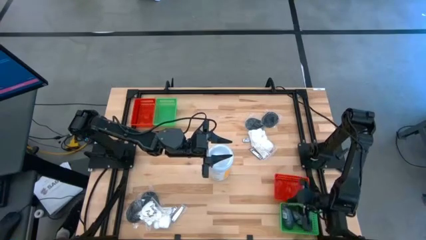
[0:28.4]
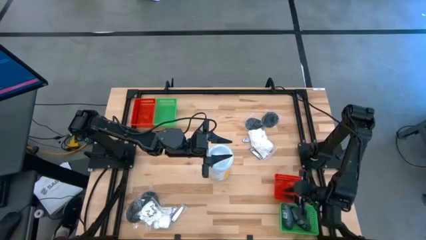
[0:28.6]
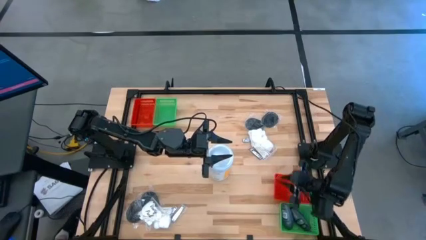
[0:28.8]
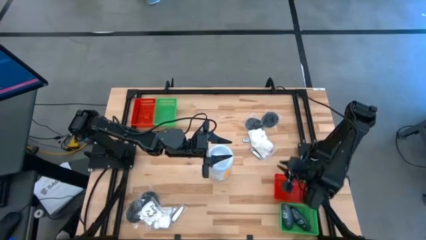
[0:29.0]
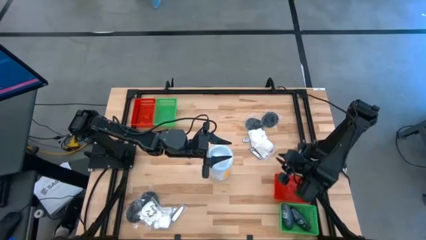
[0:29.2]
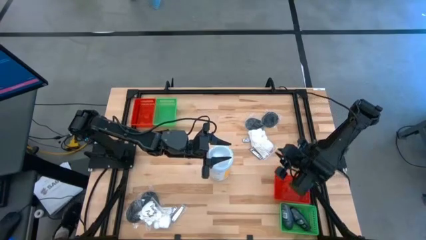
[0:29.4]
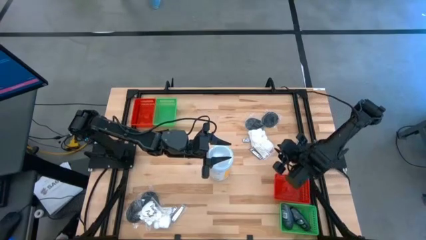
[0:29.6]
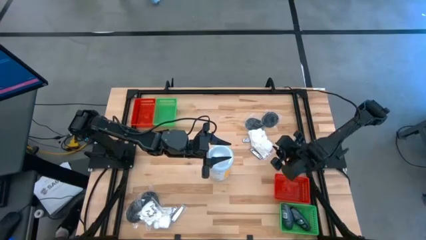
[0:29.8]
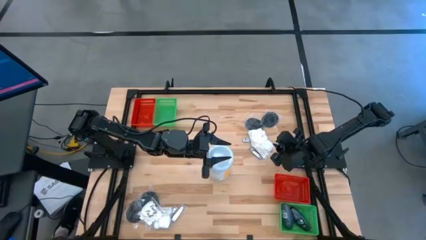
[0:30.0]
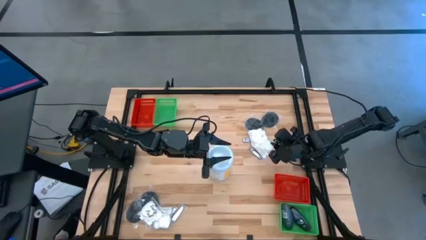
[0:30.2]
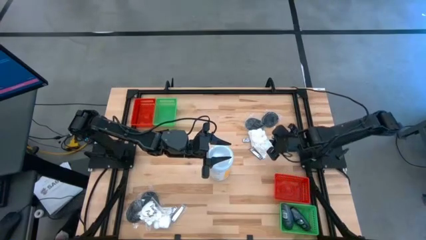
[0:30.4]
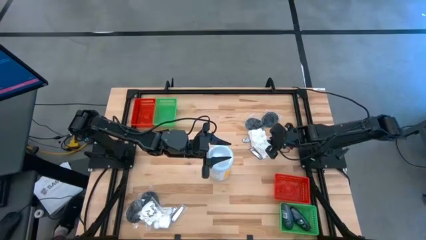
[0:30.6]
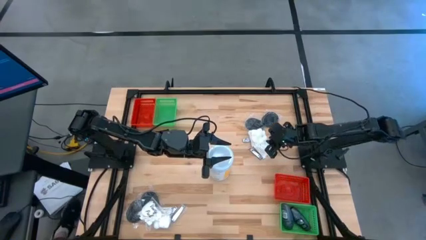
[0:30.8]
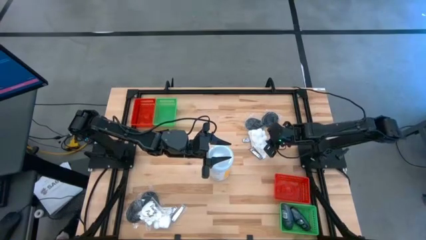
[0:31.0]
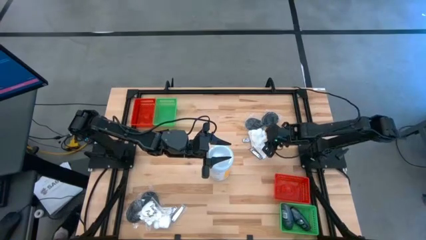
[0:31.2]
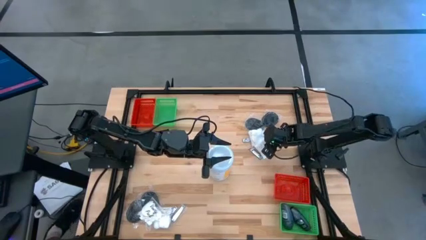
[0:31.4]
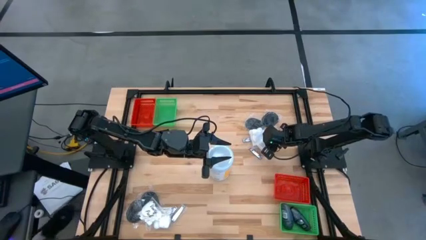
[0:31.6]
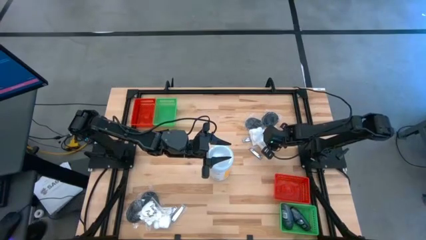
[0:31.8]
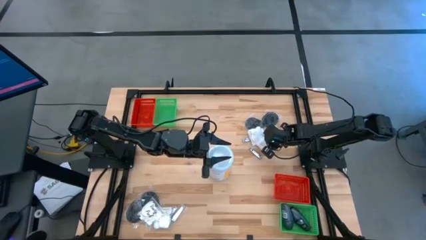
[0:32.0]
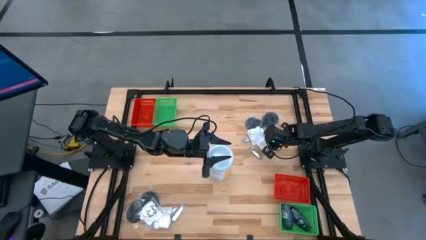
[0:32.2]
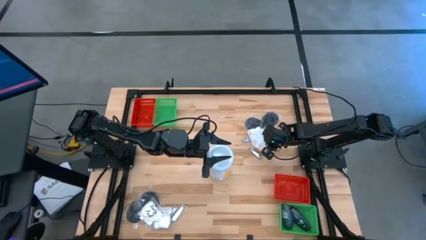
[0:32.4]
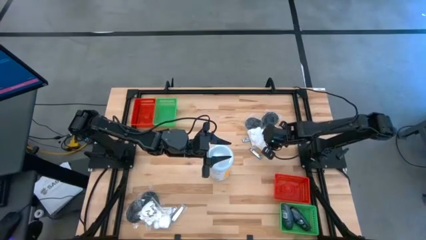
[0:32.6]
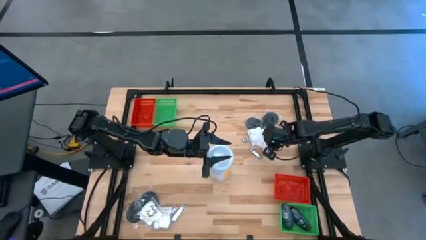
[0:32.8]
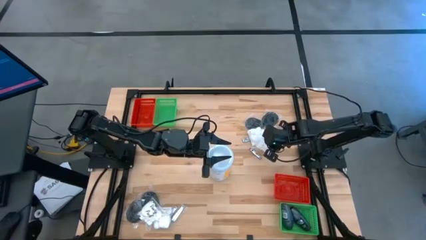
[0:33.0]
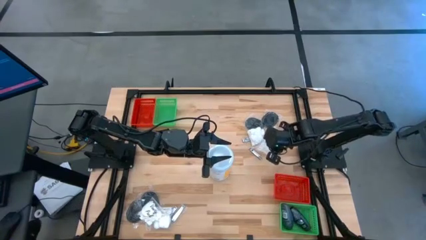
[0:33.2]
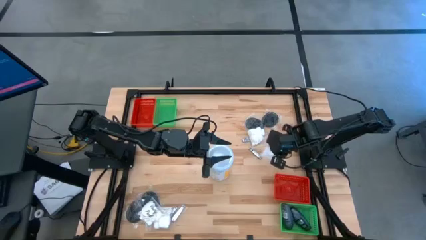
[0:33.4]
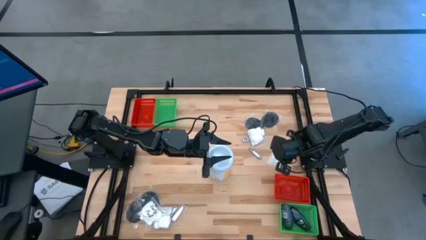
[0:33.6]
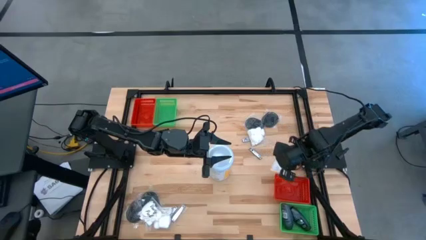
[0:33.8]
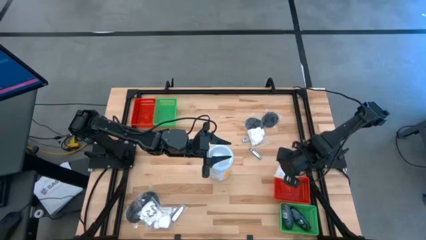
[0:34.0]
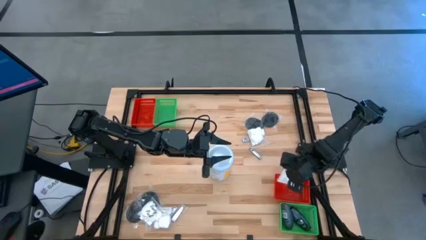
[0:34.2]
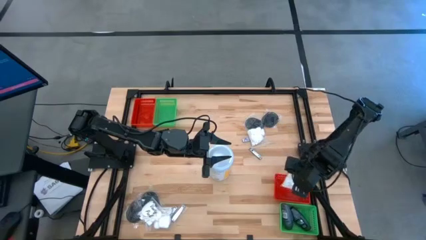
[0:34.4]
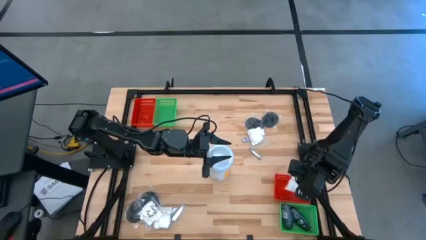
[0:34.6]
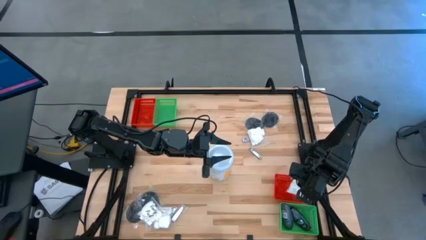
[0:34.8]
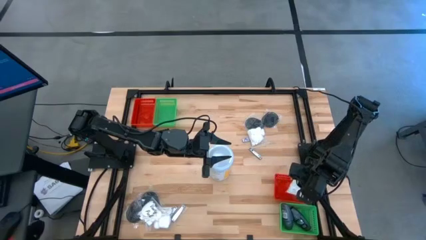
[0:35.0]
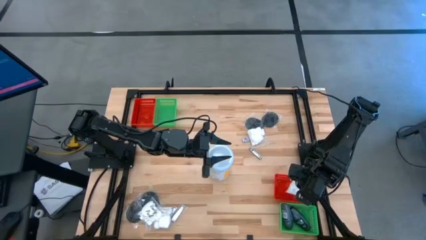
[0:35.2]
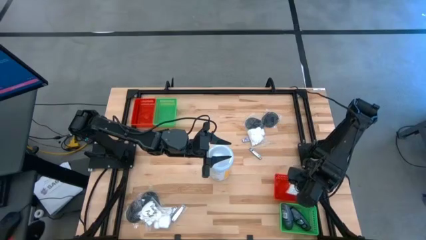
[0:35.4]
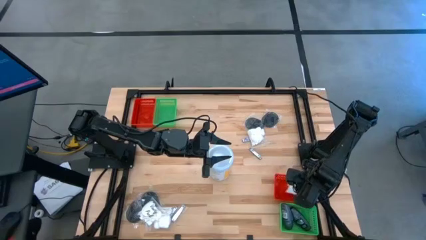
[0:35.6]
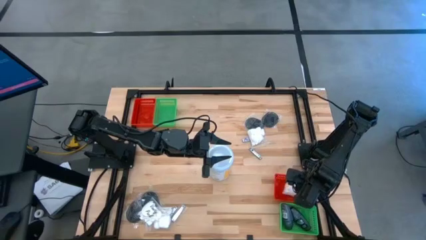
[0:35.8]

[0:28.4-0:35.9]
Task: Pick & Place Travel size toiletries
Put the white cotton pack into the bottom red basket

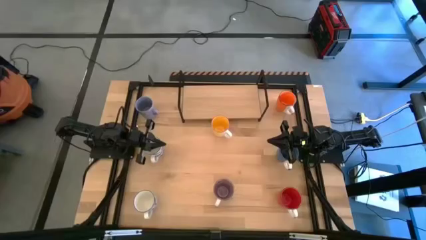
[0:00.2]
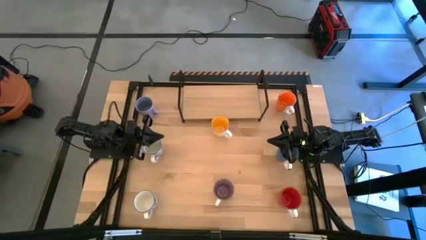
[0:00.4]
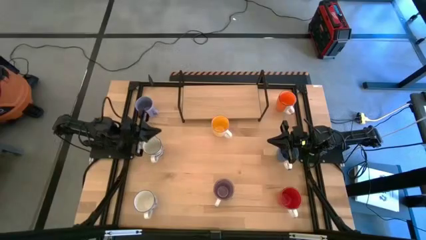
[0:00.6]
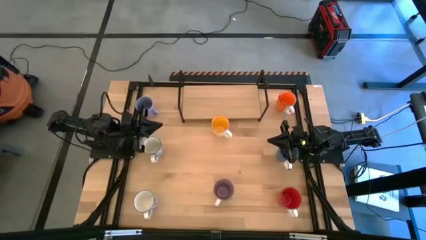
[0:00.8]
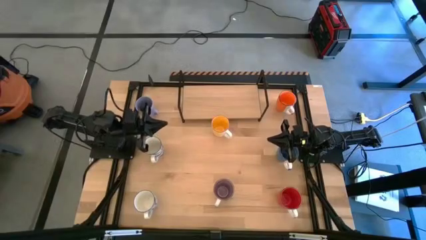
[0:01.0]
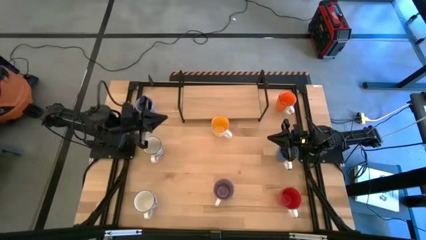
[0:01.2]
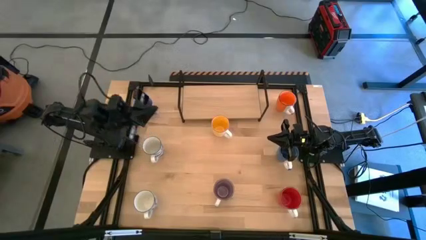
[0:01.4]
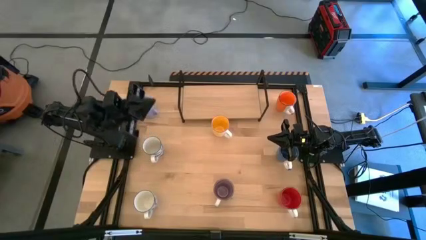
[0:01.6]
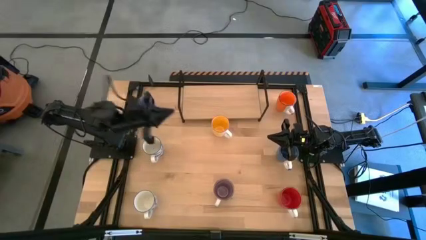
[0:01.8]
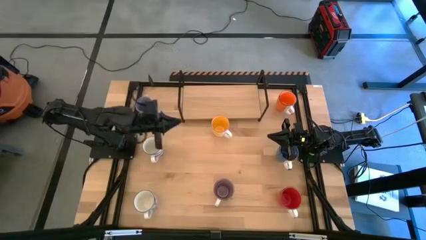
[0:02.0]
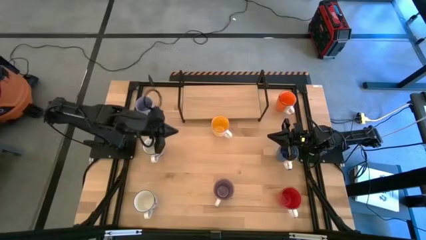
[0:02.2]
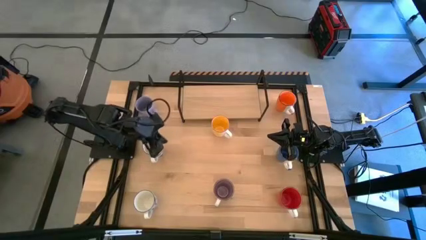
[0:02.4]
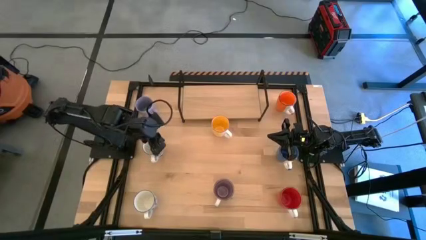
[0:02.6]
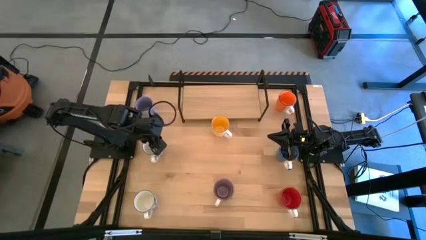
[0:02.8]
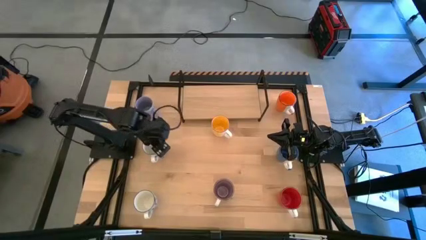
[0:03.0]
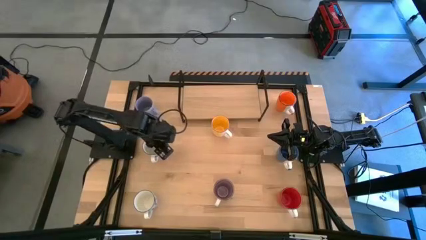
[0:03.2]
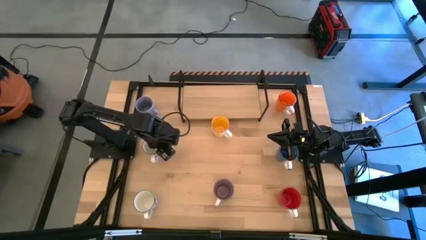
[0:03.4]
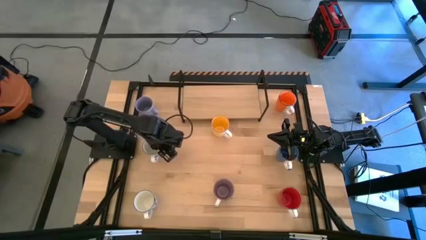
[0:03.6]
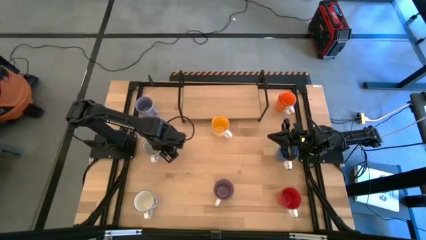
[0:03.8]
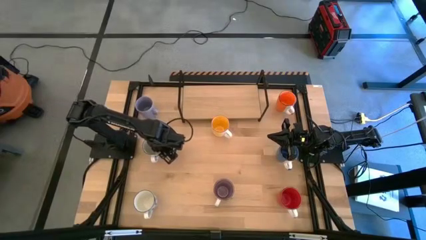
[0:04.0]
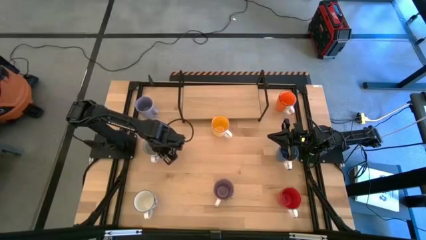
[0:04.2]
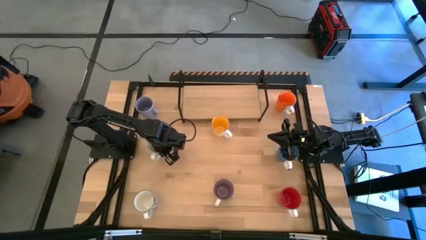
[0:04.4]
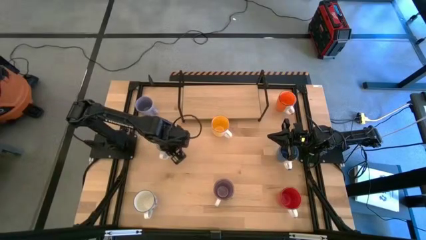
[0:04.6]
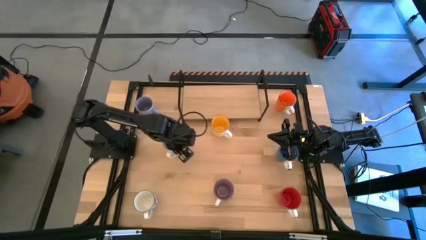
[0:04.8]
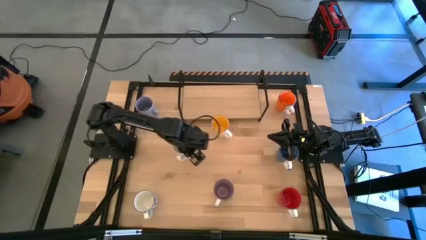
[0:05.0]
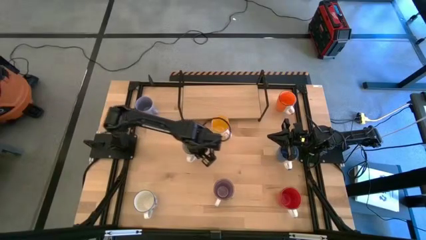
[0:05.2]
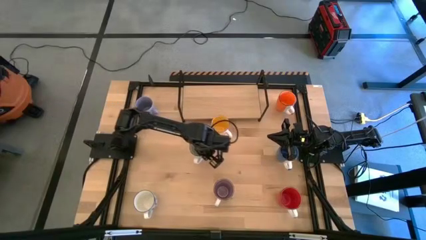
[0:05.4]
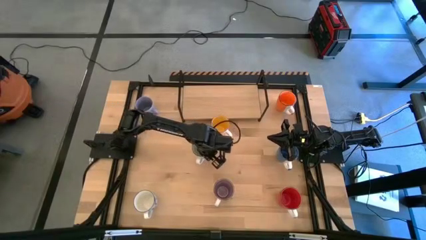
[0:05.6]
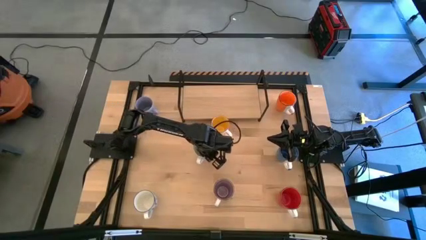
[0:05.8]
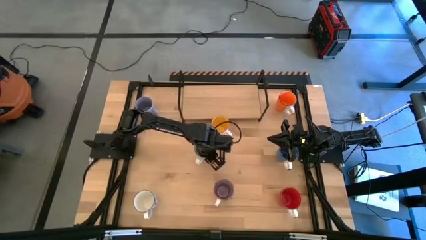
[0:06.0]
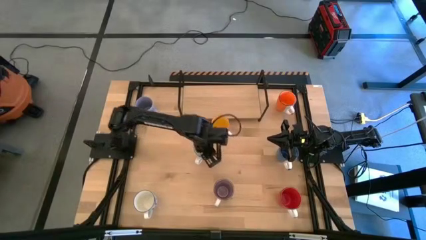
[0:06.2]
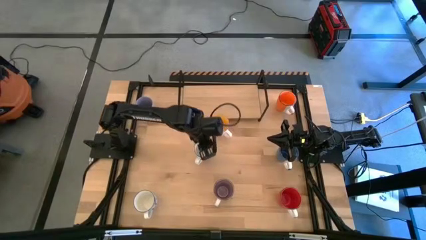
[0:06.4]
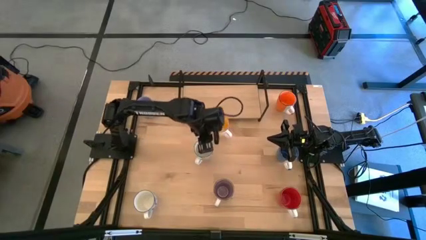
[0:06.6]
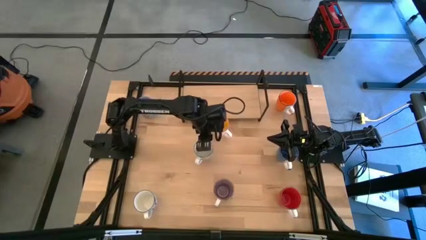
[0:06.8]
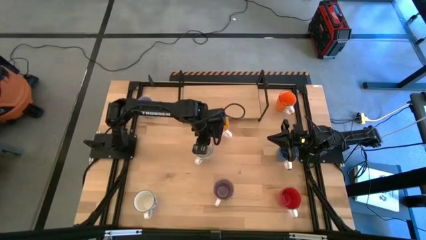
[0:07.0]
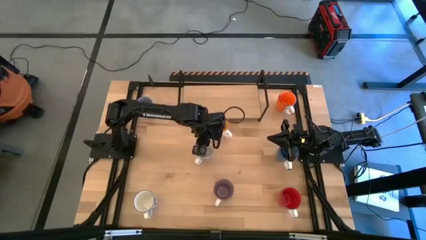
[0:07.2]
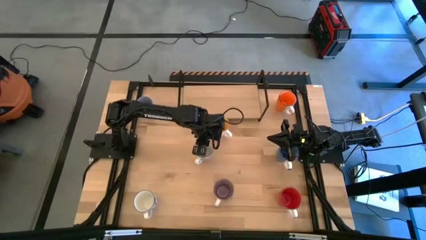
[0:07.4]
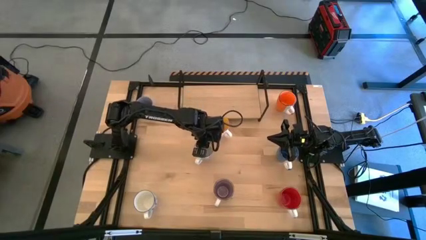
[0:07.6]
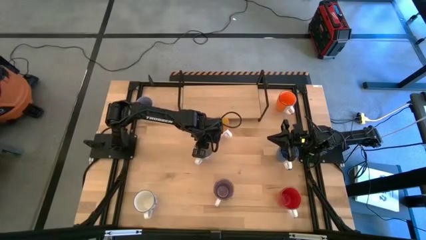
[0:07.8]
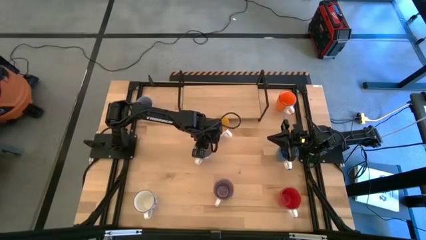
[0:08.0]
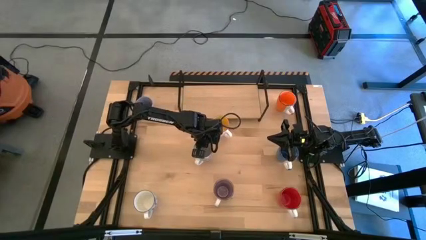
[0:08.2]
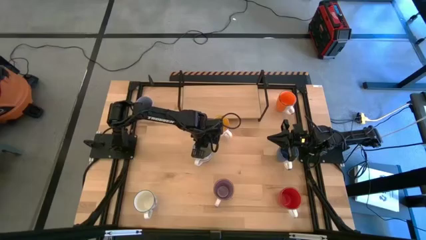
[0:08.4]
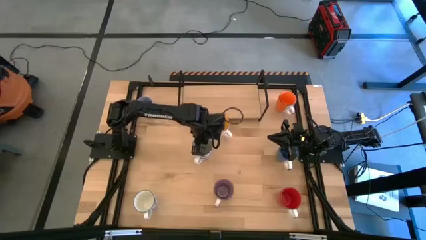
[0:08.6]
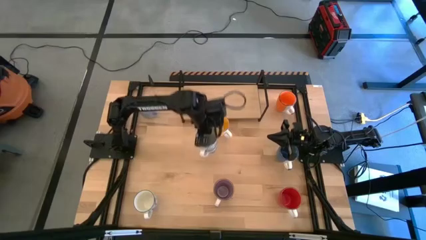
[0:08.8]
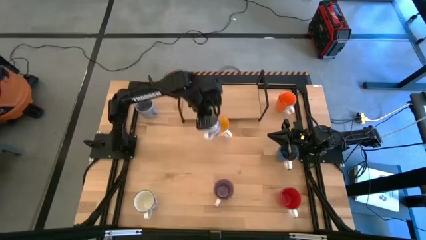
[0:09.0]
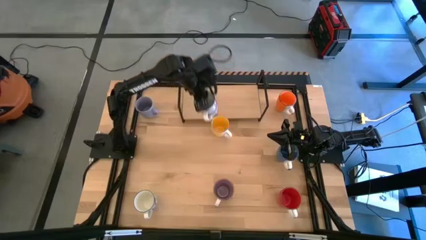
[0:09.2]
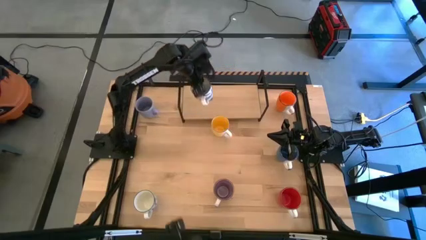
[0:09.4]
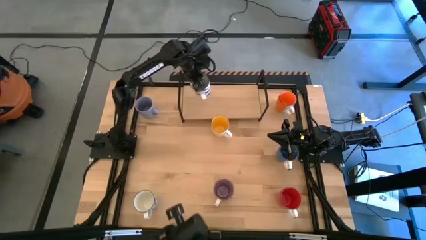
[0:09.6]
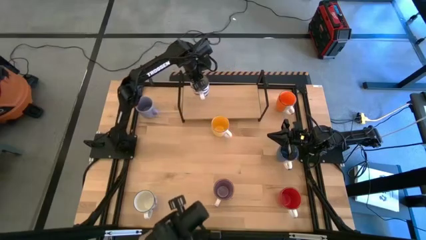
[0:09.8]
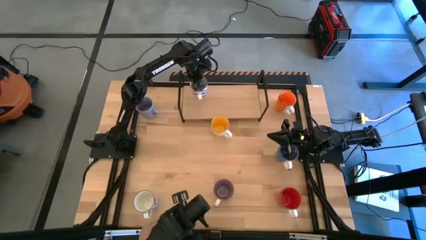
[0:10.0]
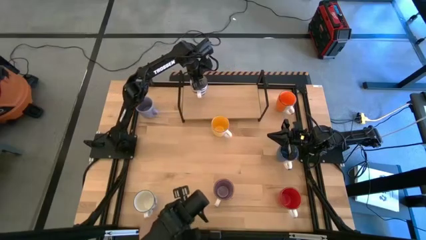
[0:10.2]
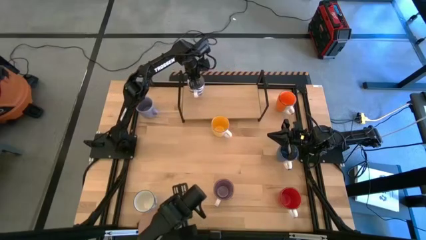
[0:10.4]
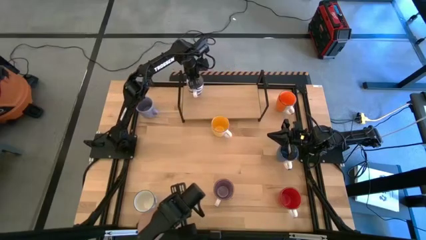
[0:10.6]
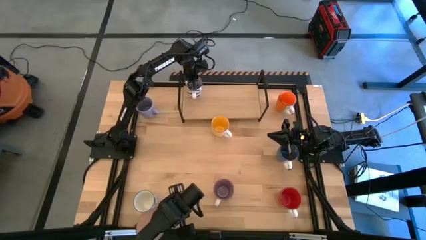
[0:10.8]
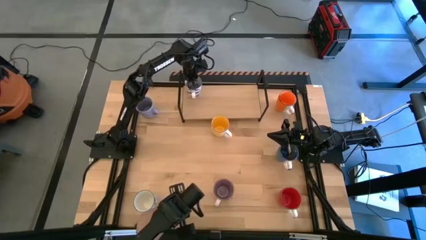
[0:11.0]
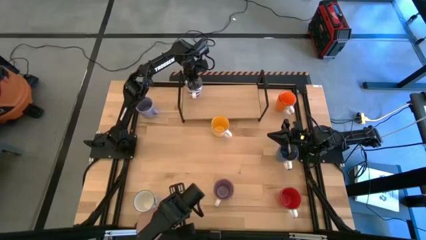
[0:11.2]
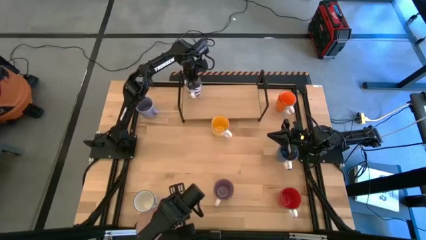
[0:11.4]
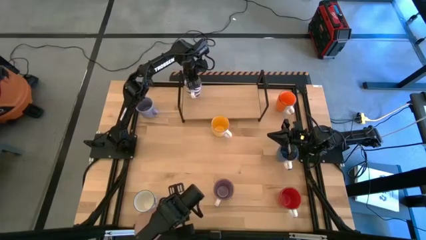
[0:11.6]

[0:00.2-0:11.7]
Task: Place coffee mugs
Put the top blue patterned mug on the shelf
